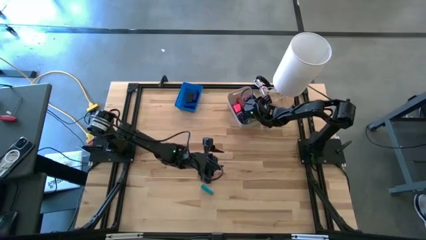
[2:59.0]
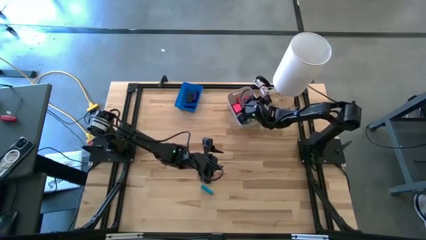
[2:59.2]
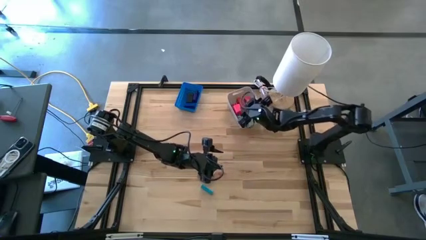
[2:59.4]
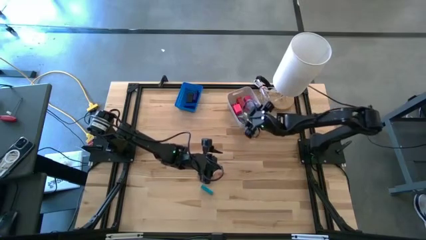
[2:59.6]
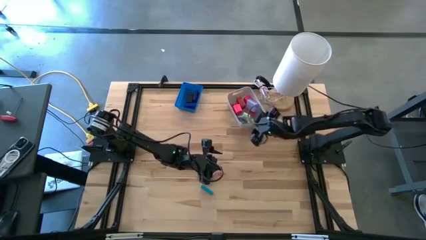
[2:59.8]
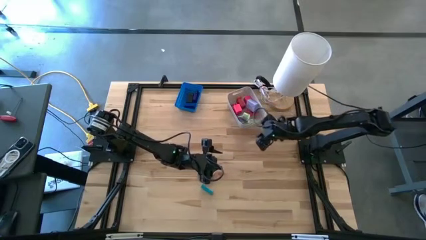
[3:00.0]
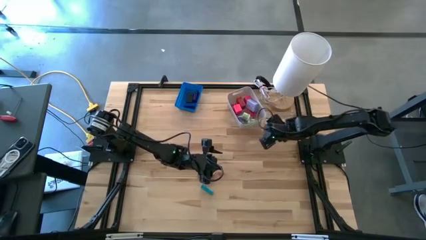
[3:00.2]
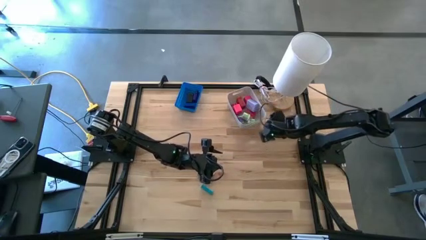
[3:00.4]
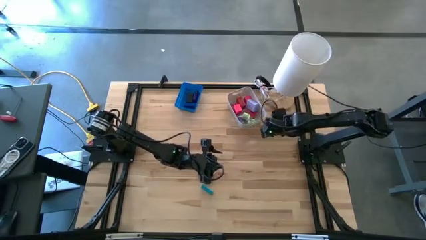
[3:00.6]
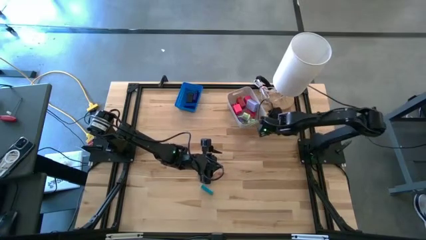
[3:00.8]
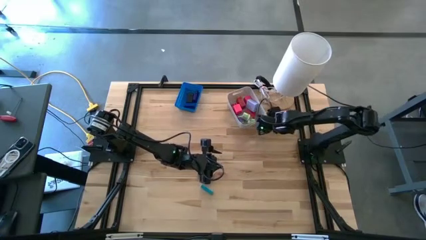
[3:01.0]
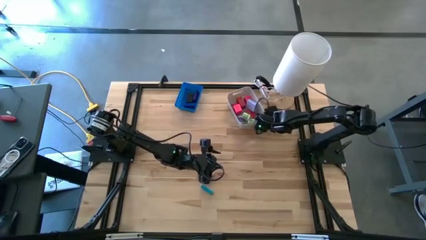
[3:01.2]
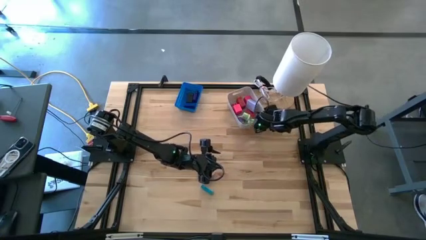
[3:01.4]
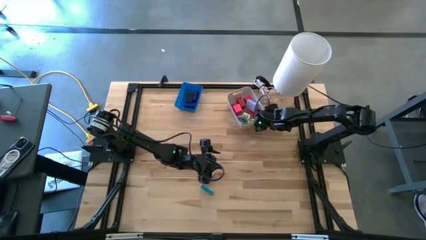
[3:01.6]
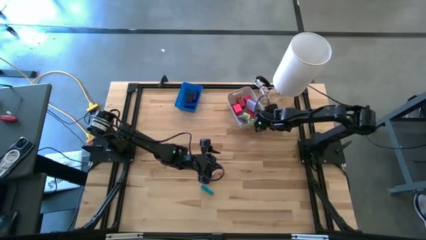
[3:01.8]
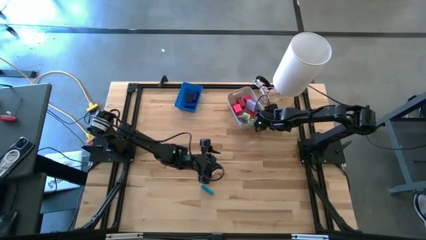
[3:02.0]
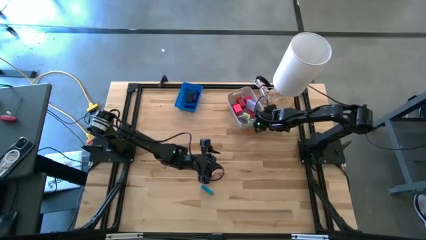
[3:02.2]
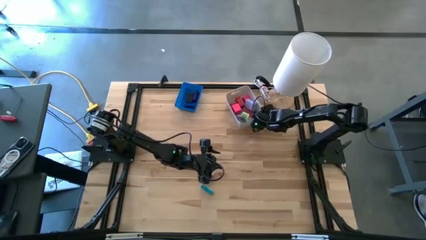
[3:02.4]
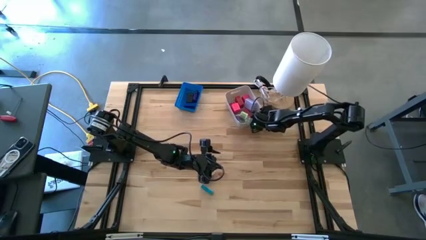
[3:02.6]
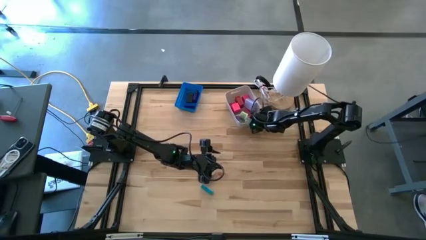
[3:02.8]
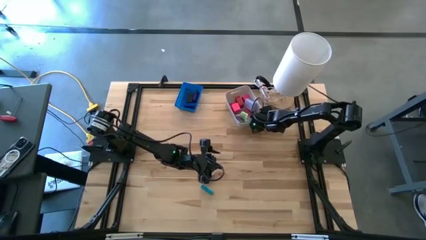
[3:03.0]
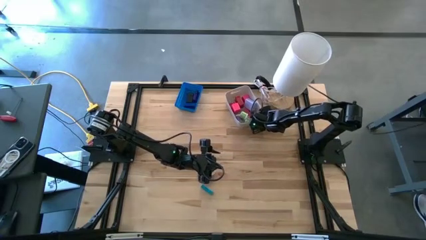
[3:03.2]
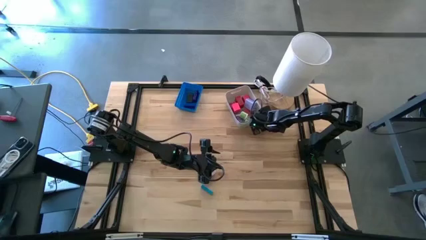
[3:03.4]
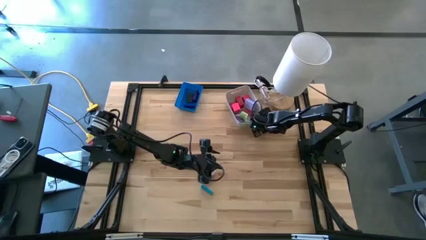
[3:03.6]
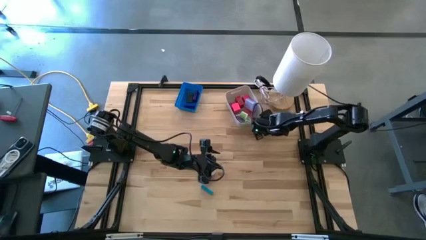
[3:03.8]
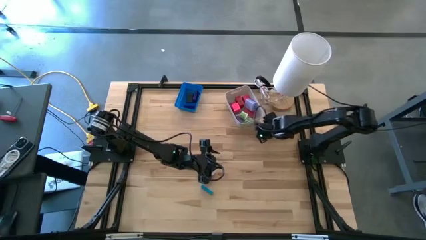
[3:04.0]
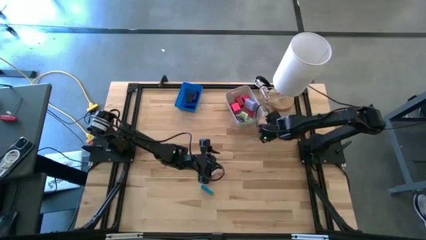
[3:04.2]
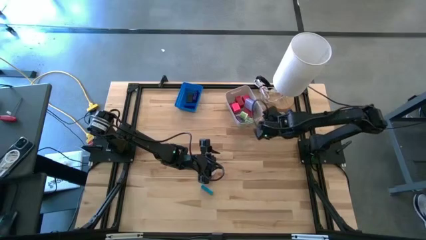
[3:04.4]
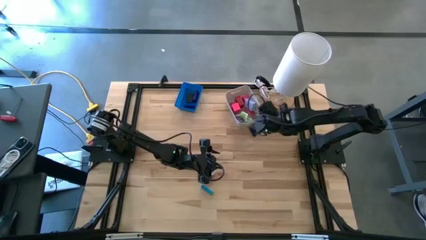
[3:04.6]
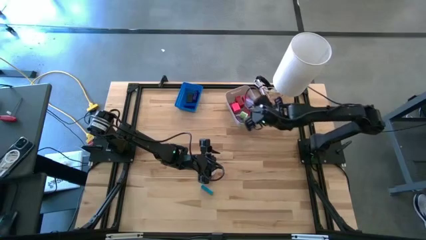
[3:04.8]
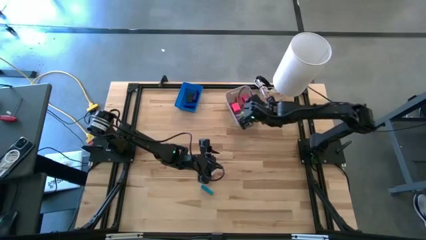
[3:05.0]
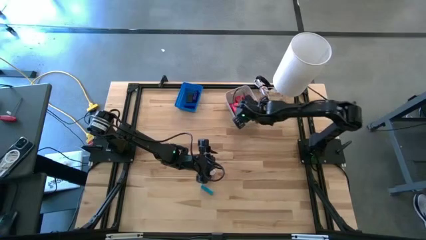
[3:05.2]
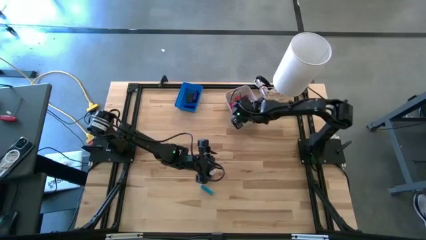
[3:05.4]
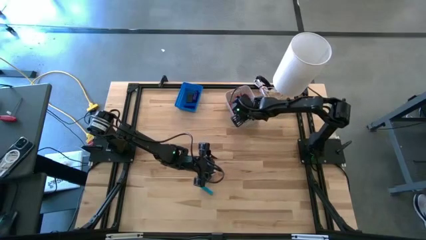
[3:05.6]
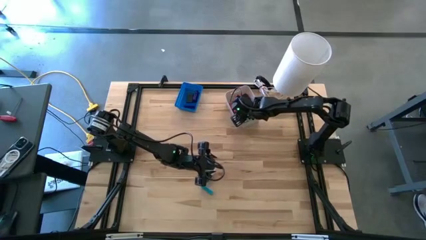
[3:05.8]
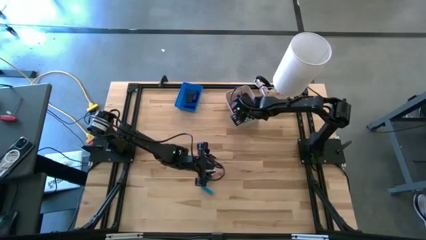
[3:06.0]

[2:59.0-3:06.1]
Task: Pick & Place Office items
Put the white charger adapter into the white bin

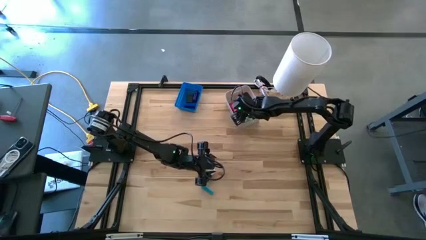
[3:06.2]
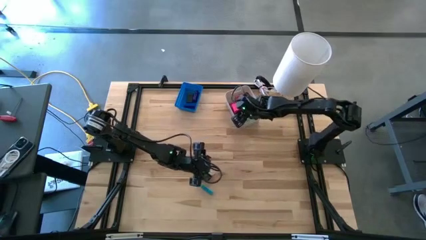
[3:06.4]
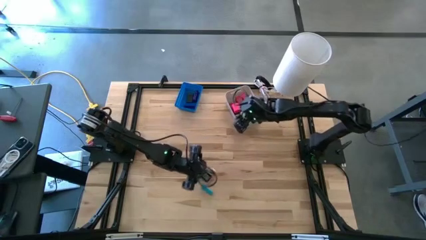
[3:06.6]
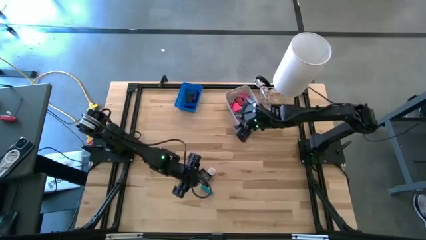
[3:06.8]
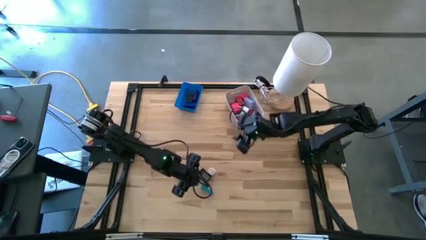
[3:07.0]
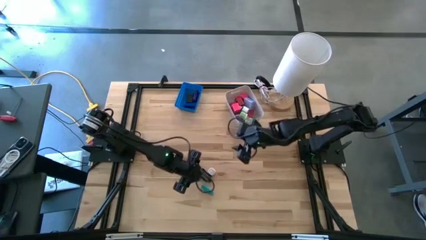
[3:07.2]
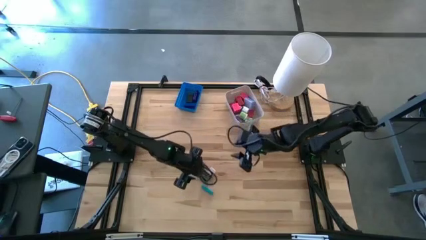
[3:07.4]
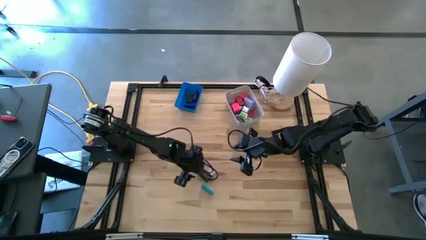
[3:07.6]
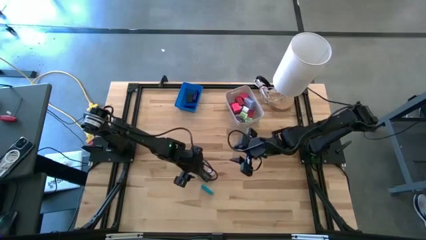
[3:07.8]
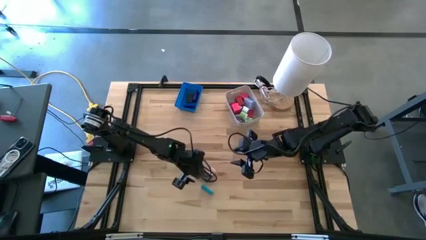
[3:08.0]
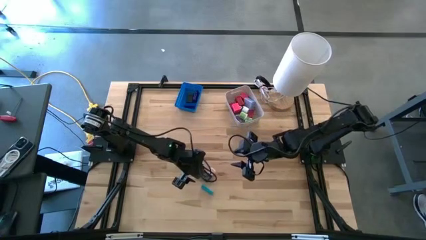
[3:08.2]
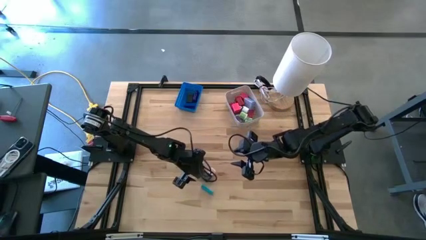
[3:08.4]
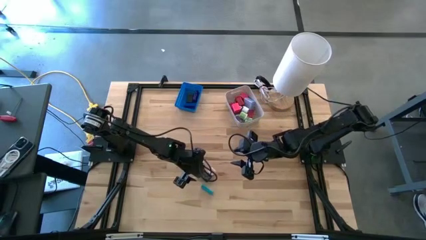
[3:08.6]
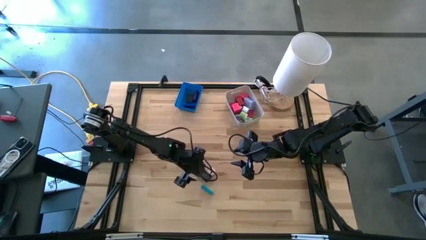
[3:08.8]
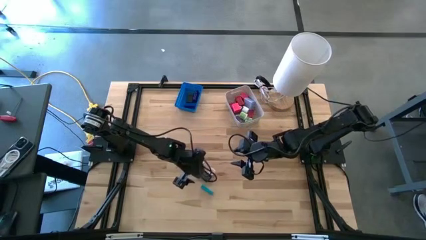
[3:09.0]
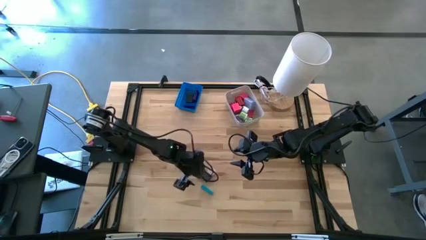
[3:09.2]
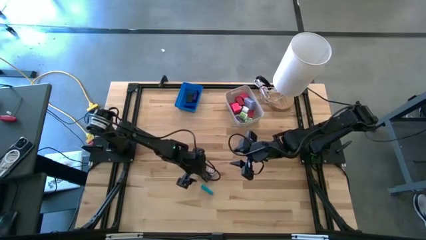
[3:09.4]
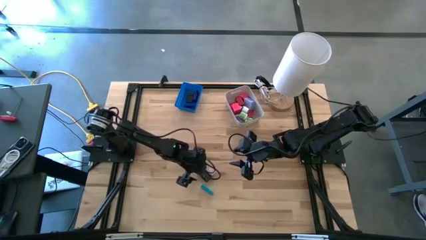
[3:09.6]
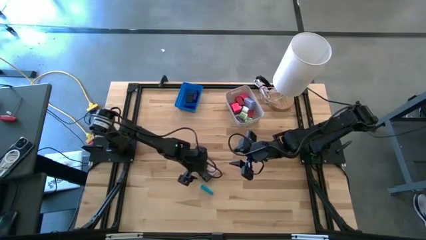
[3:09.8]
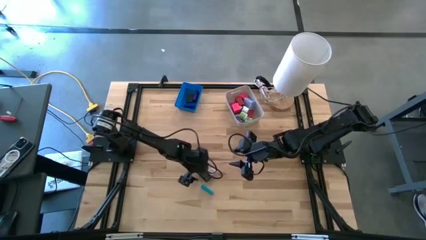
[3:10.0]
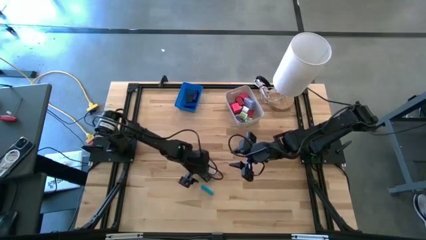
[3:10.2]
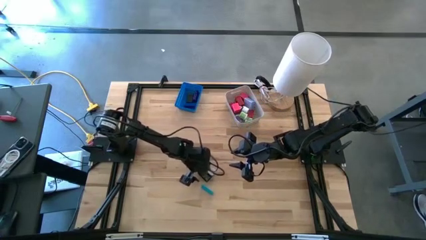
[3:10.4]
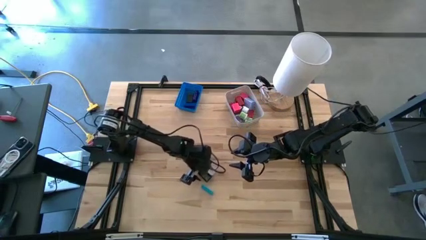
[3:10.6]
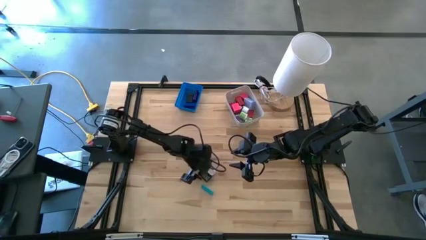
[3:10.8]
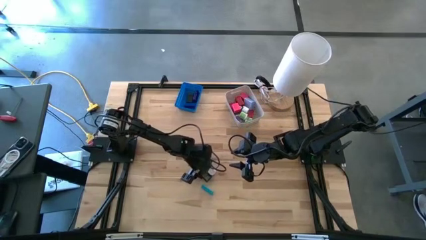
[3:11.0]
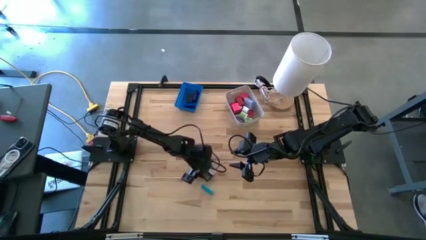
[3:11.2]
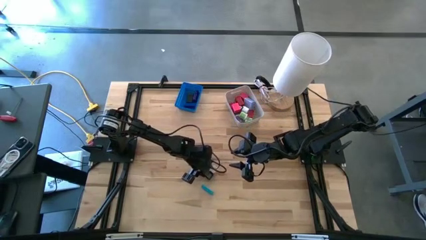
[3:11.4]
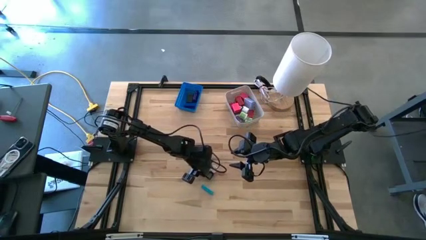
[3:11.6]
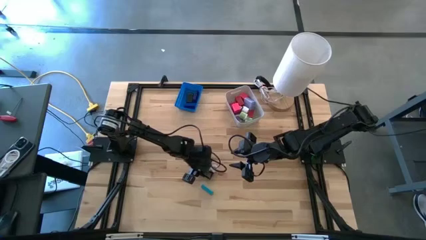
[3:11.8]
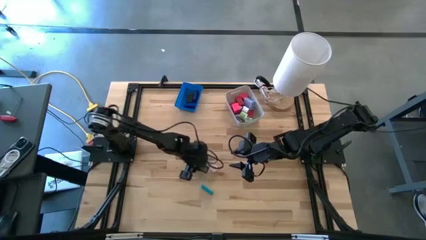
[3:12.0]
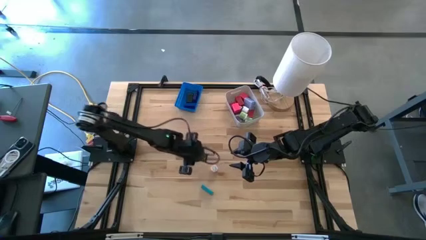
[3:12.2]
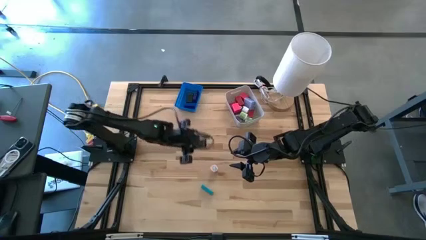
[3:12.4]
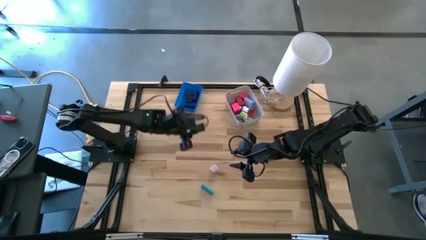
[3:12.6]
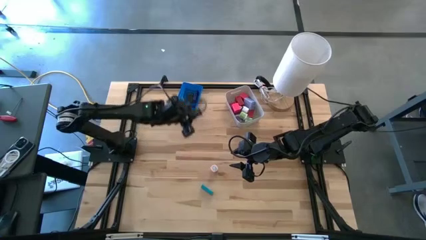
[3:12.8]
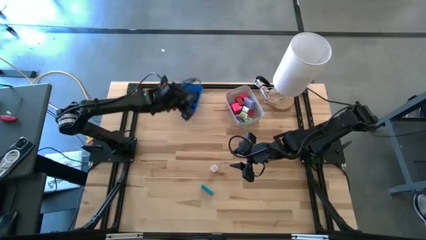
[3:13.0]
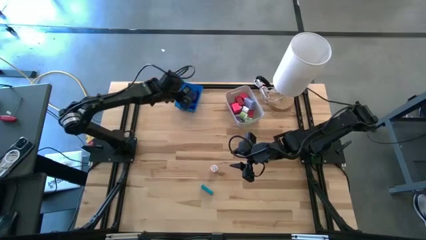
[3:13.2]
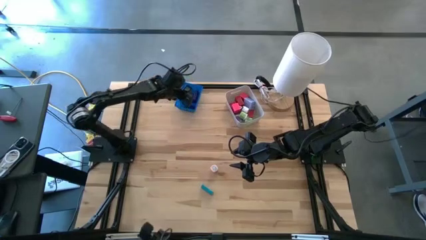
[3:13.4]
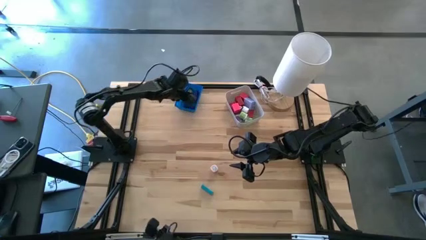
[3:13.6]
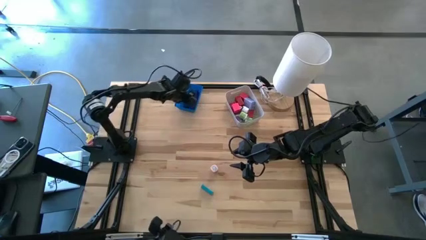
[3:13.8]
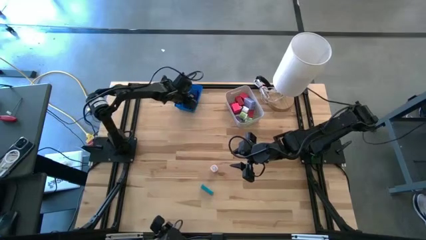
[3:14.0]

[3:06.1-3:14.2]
Put the black digital timer into the blue bin
